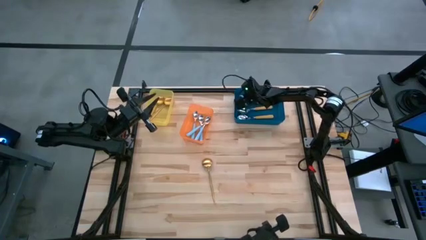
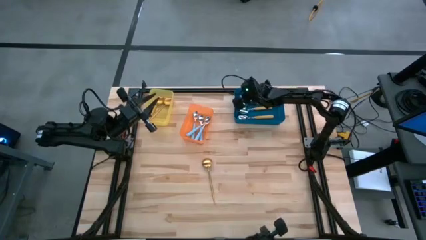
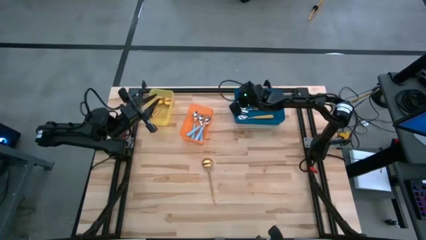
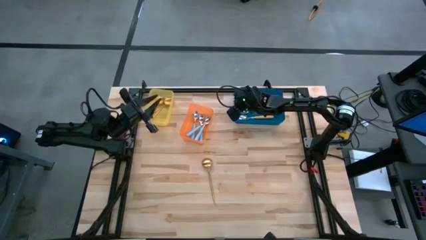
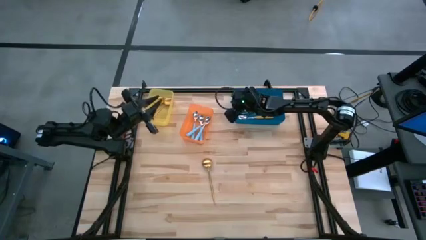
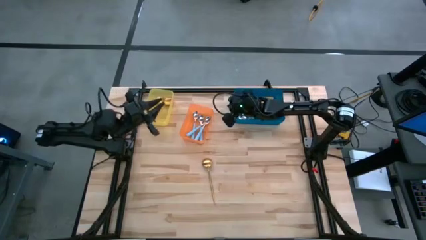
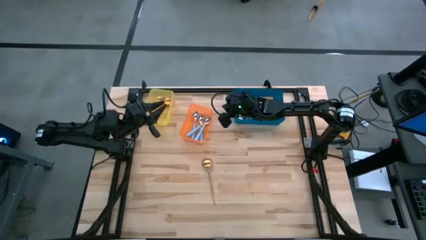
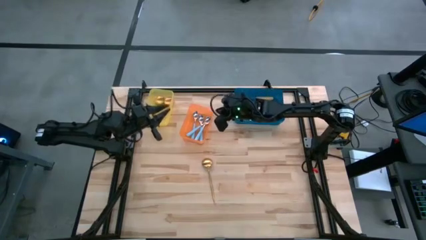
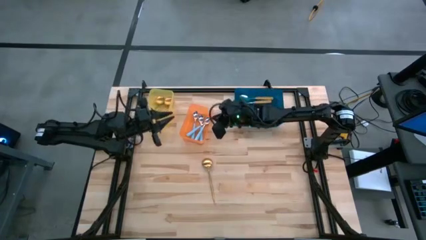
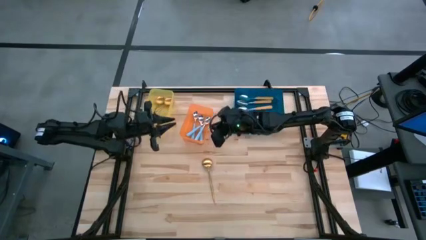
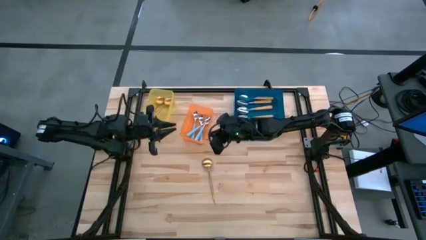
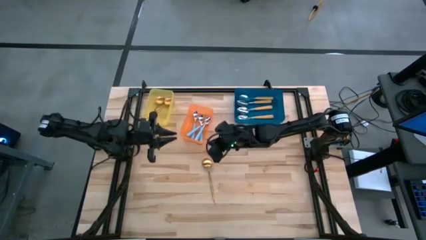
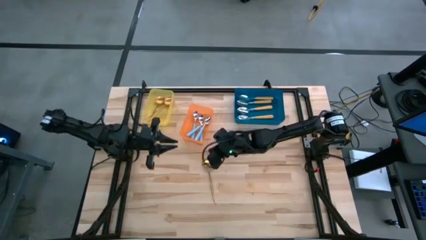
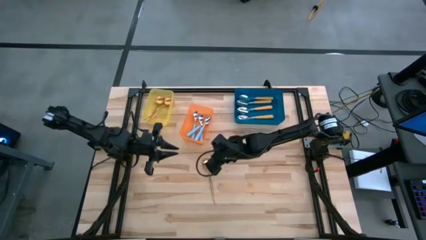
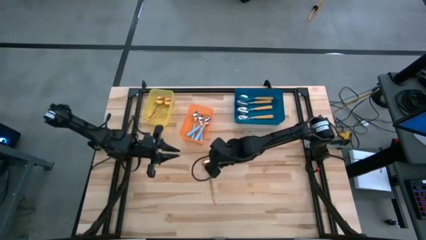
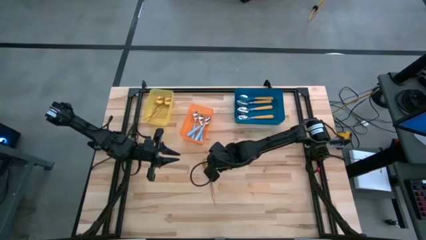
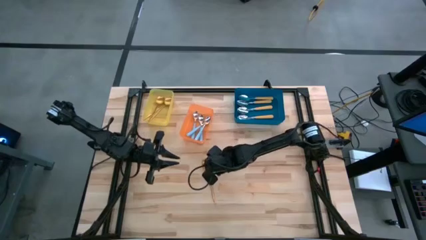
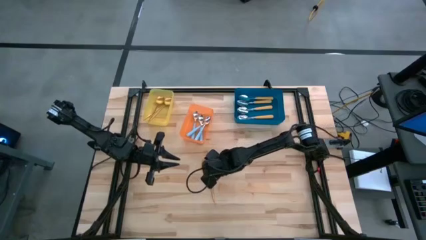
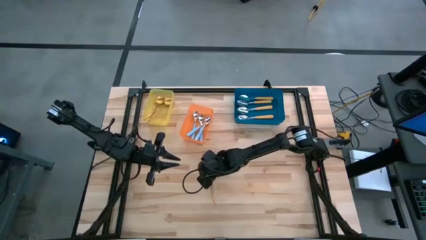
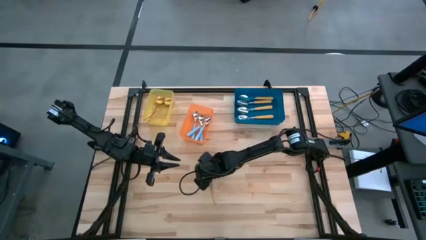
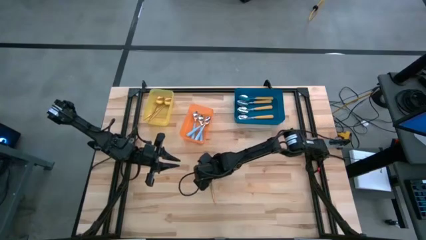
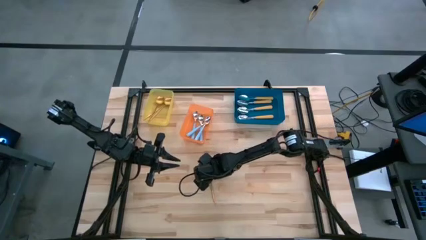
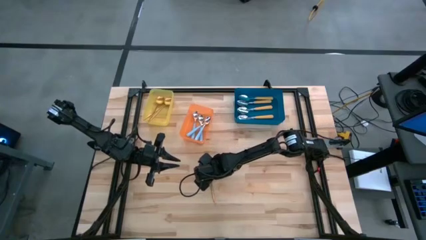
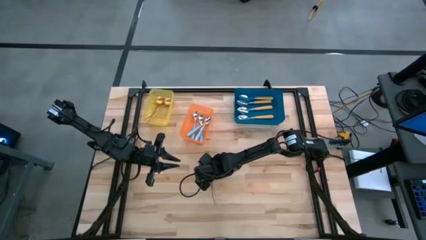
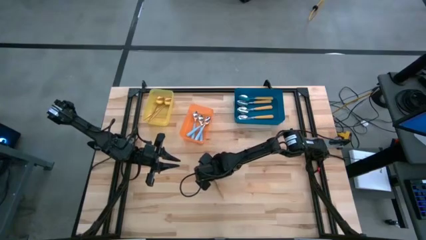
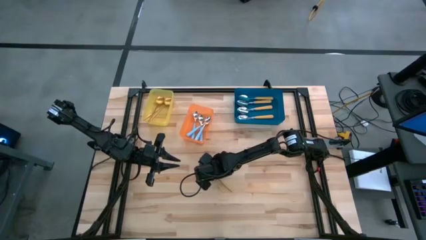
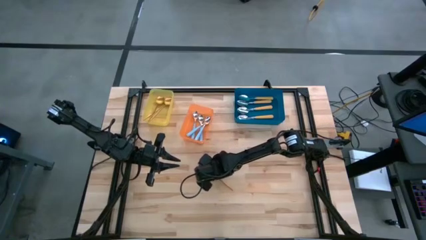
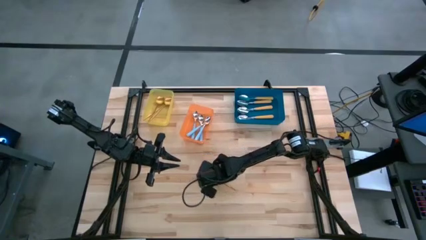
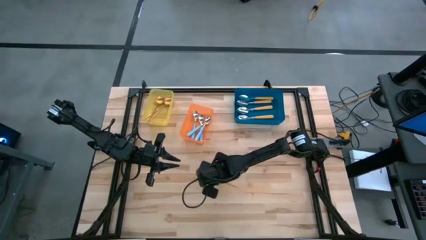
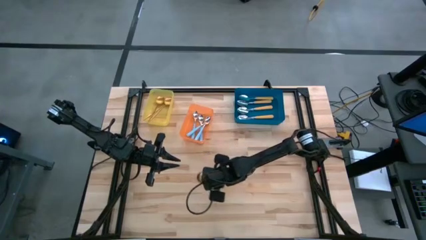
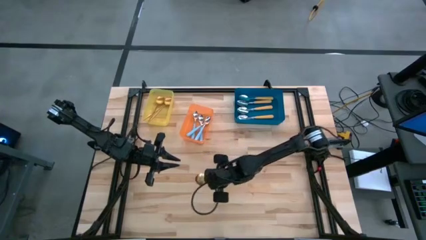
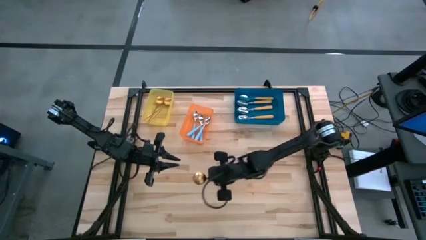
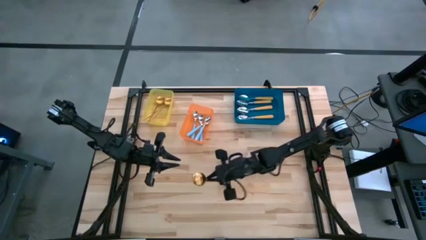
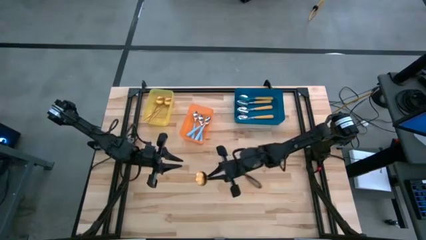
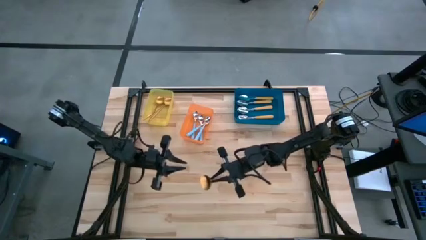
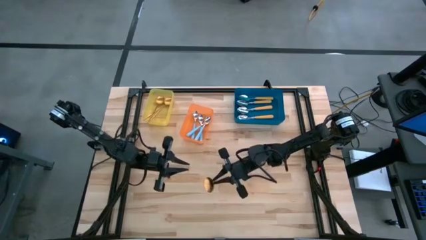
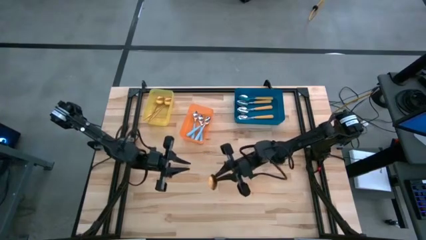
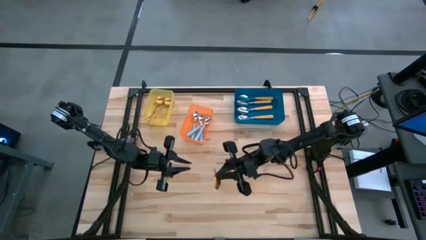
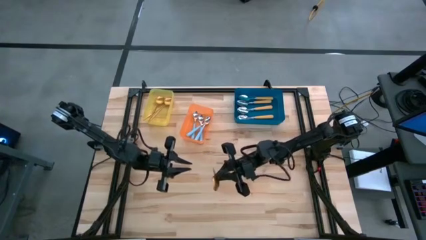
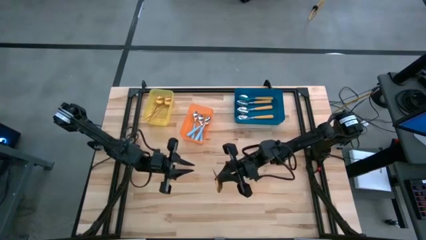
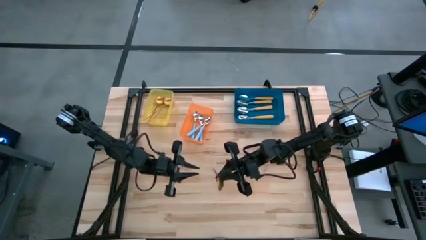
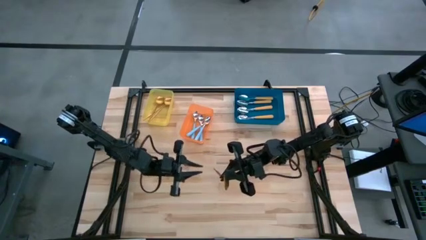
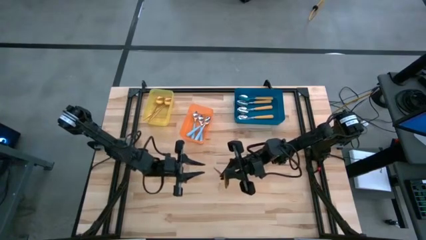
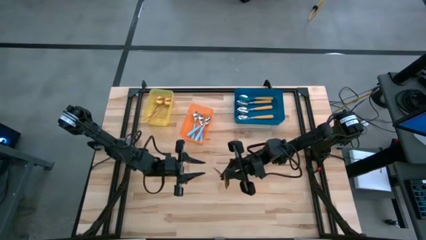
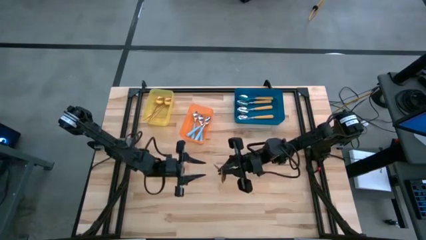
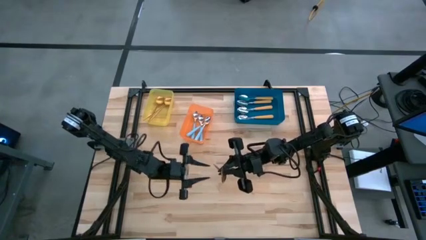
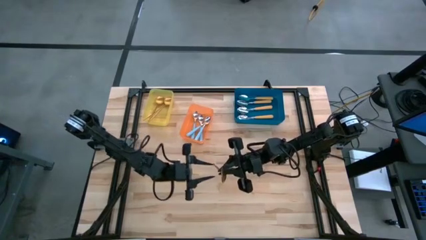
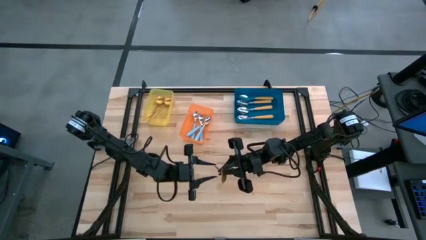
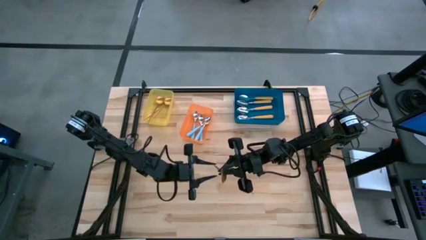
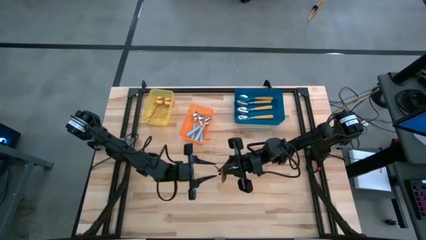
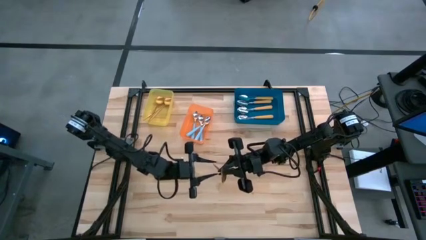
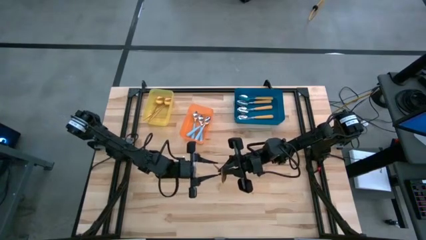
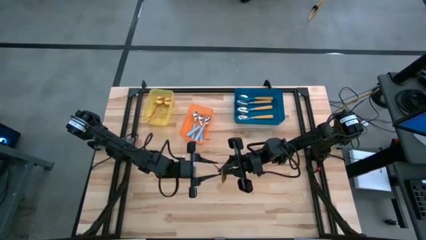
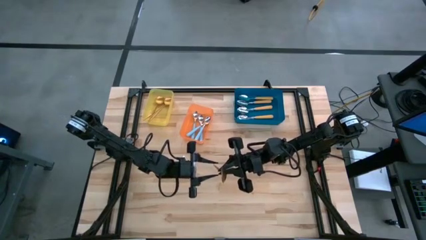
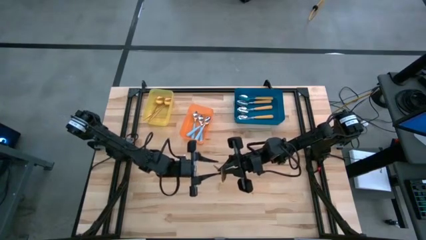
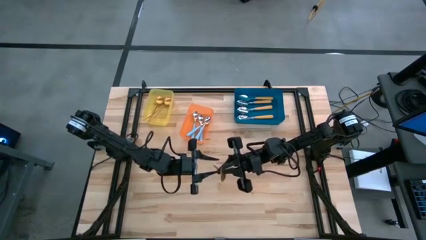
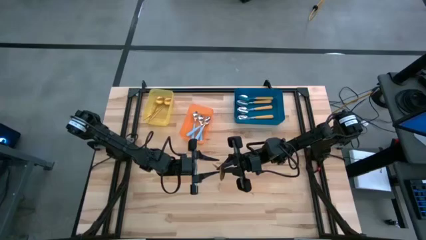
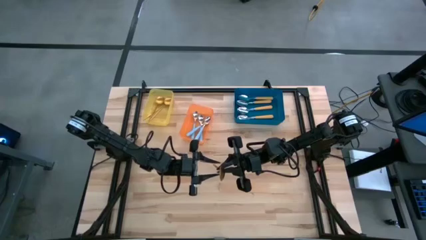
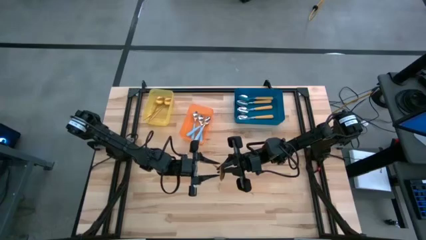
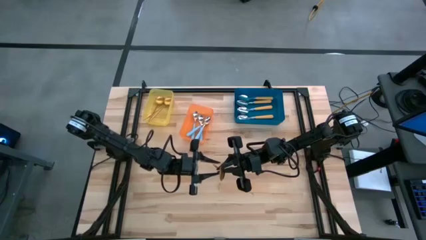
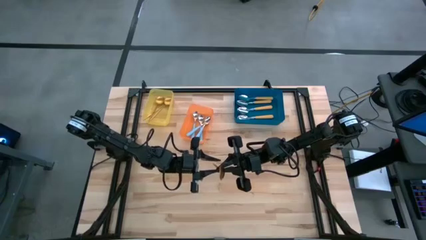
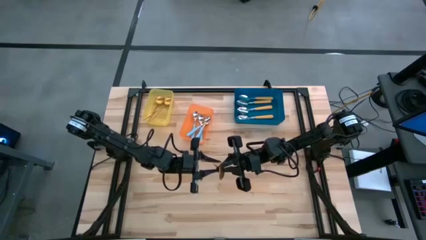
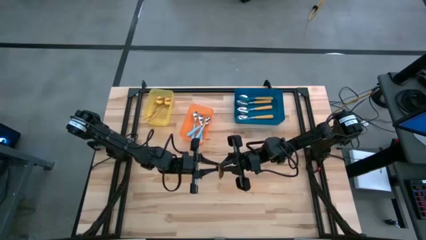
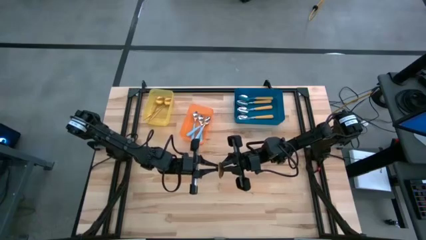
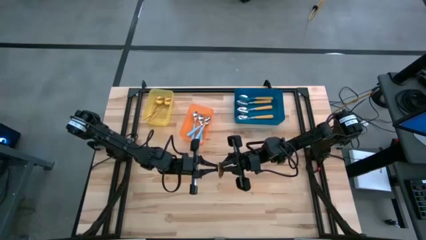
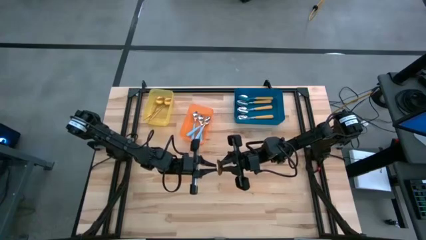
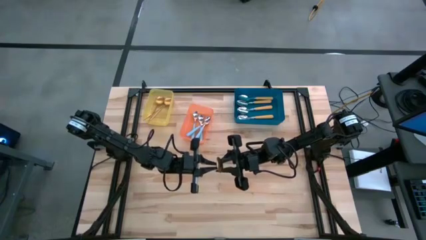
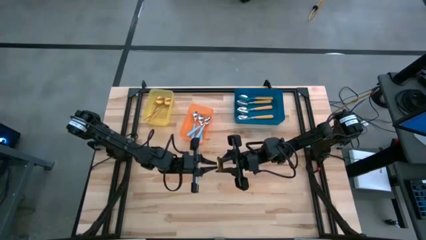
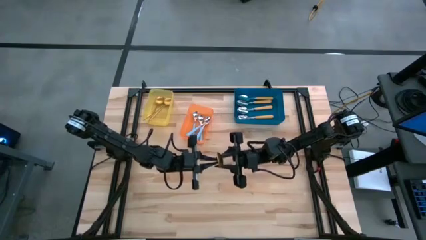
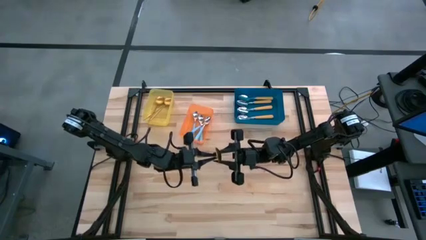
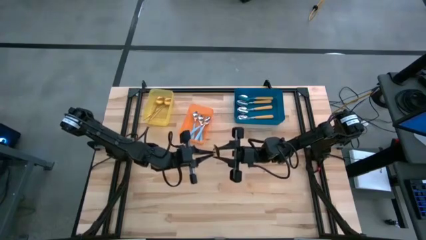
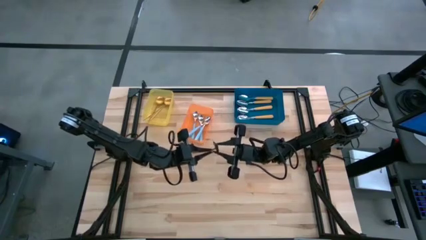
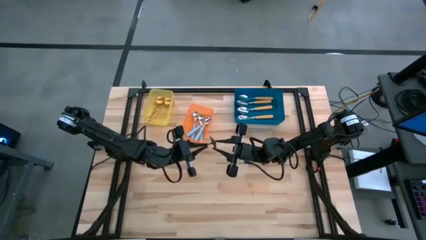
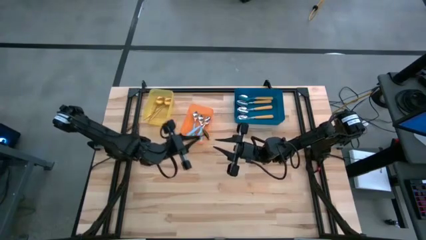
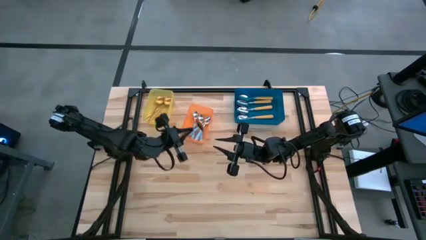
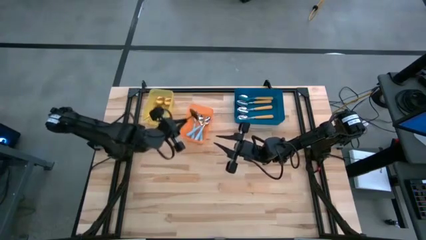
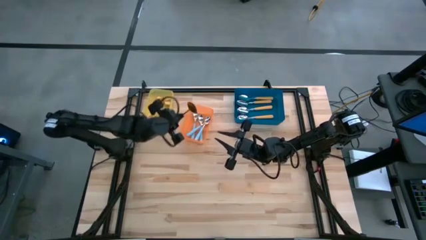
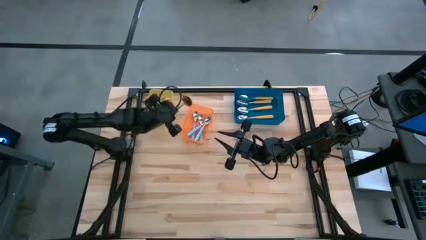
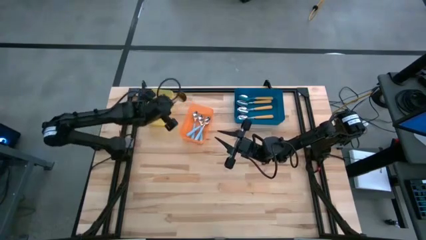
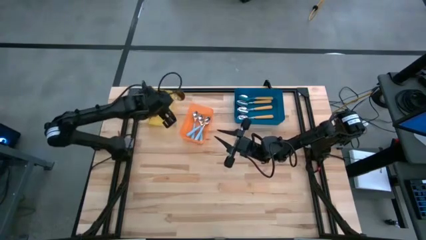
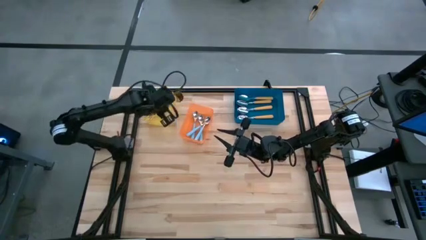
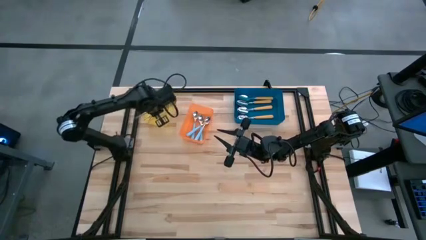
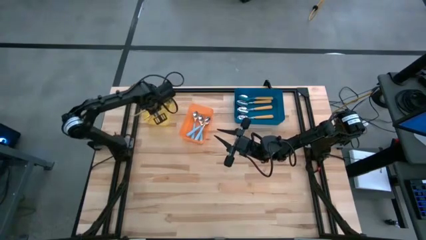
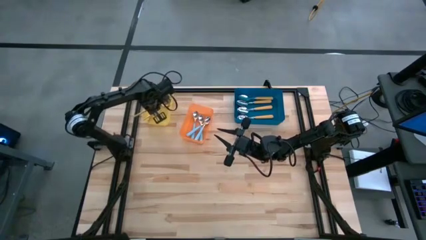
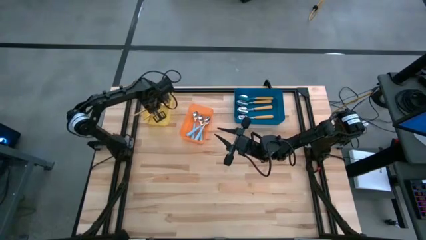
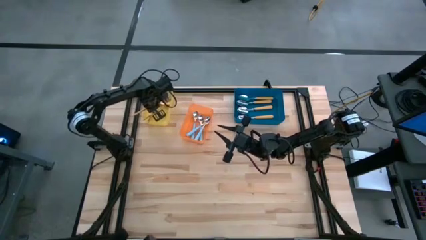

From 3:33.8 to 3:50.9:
Task: Sort silverware by color (type)
Put the gold spoon into the yellow bin
